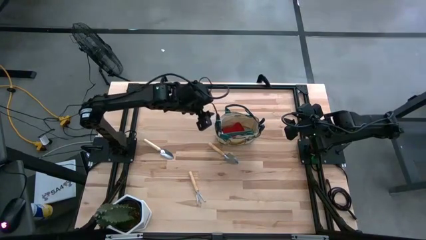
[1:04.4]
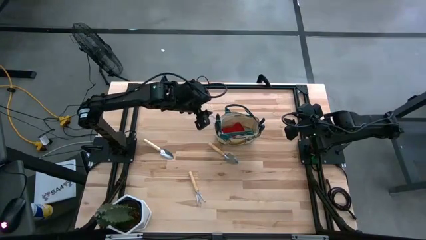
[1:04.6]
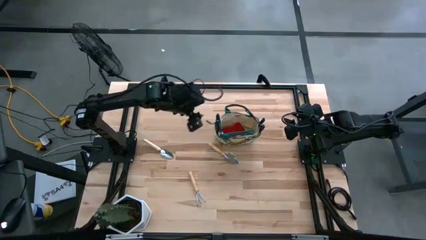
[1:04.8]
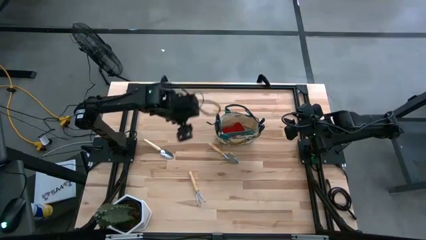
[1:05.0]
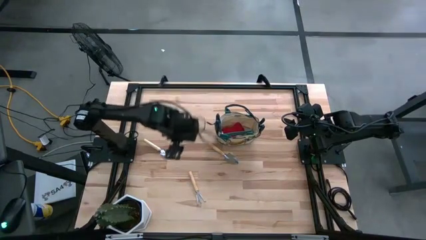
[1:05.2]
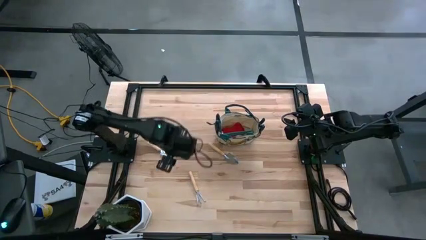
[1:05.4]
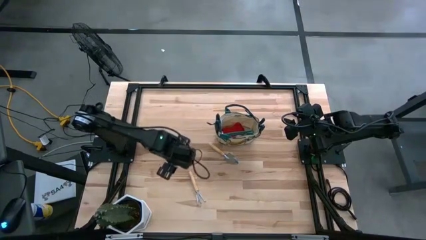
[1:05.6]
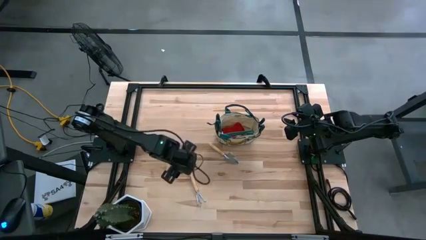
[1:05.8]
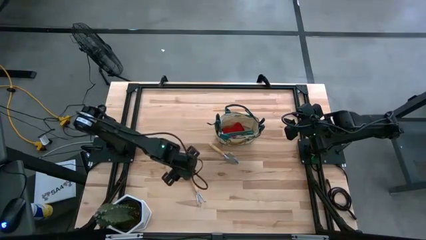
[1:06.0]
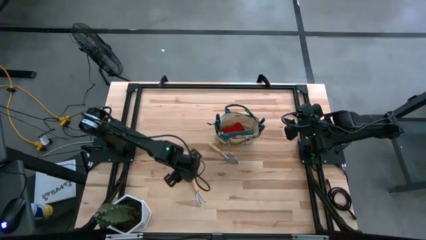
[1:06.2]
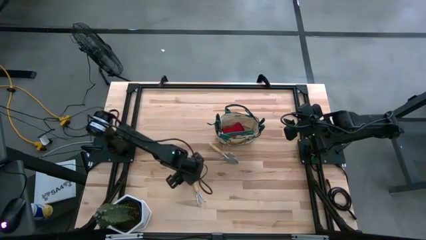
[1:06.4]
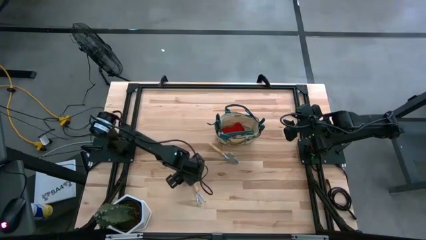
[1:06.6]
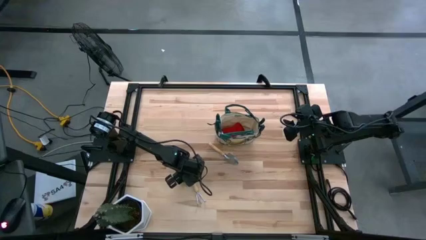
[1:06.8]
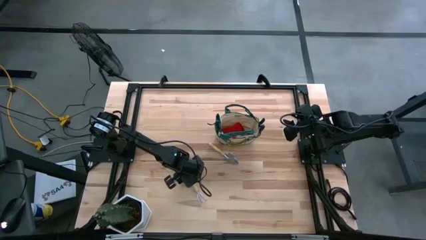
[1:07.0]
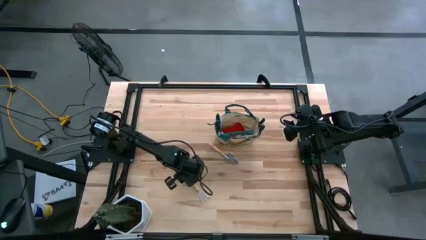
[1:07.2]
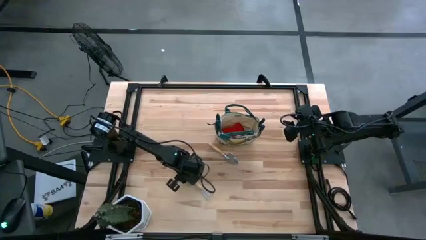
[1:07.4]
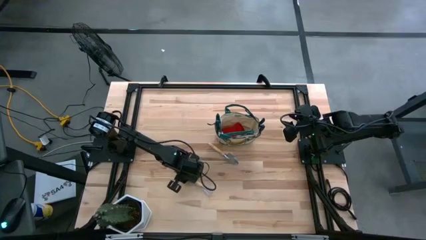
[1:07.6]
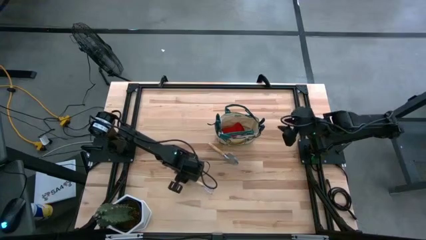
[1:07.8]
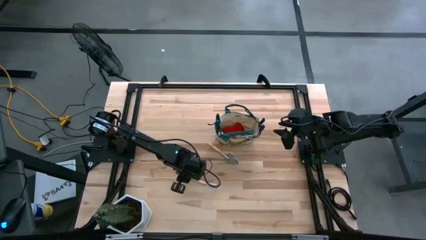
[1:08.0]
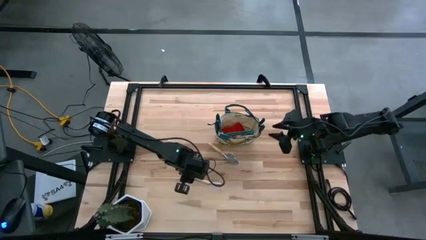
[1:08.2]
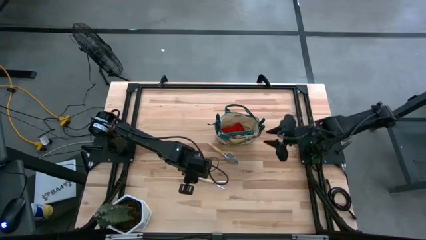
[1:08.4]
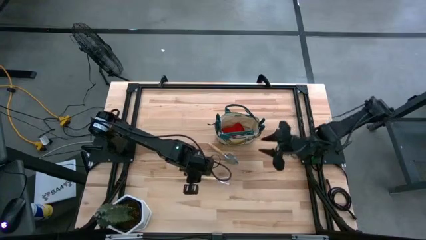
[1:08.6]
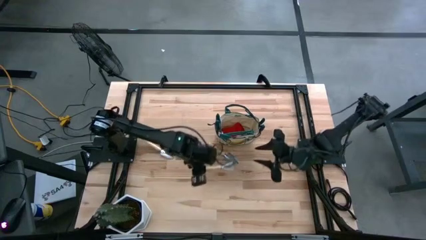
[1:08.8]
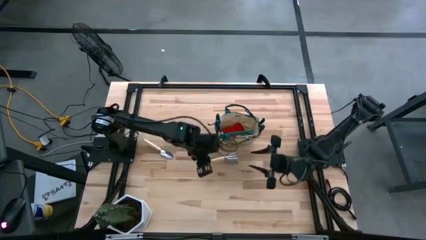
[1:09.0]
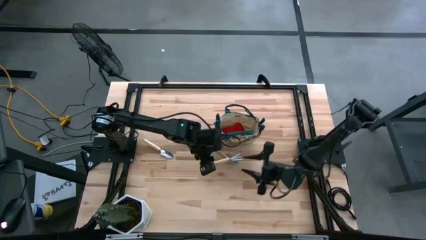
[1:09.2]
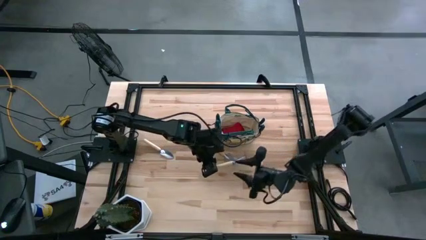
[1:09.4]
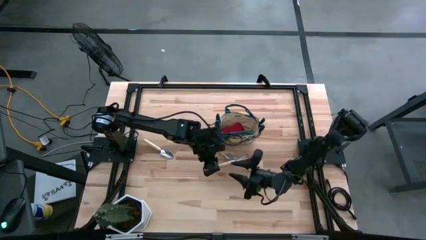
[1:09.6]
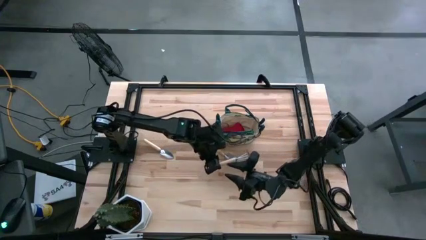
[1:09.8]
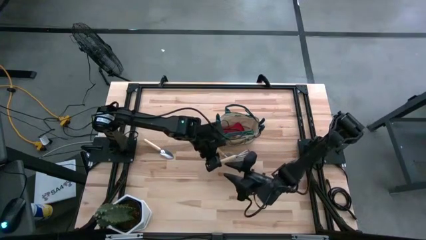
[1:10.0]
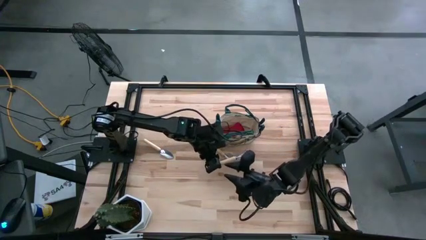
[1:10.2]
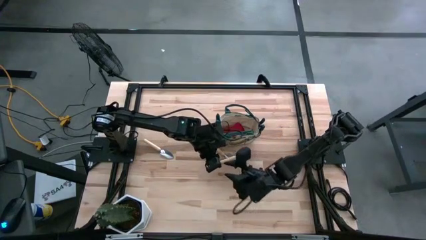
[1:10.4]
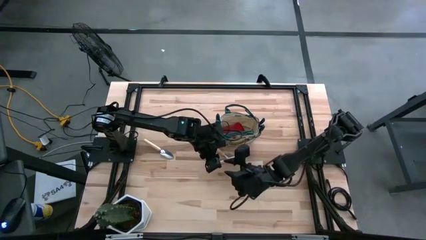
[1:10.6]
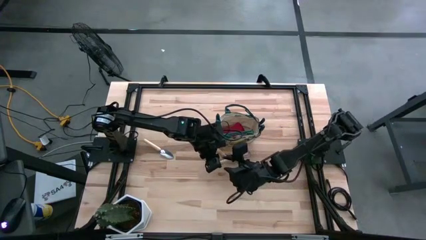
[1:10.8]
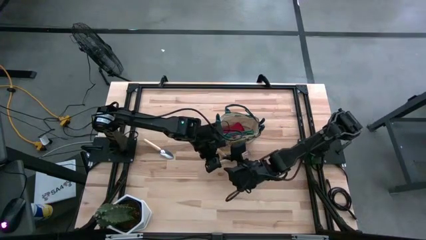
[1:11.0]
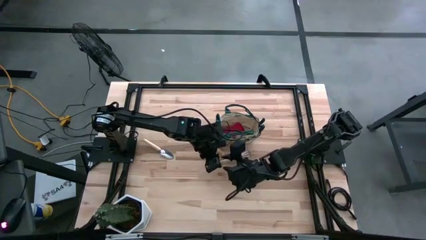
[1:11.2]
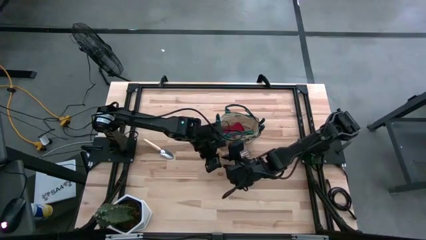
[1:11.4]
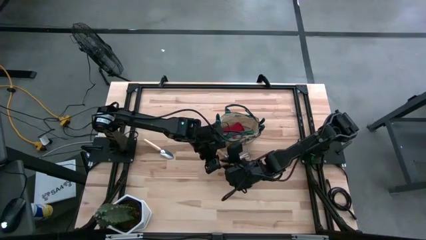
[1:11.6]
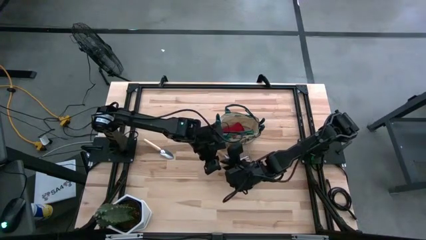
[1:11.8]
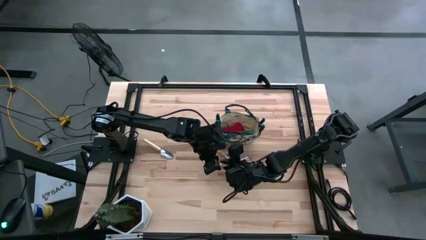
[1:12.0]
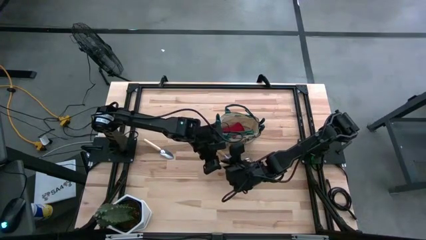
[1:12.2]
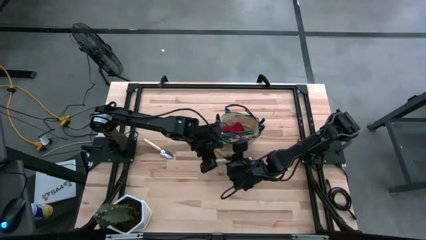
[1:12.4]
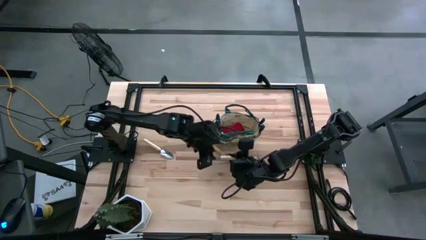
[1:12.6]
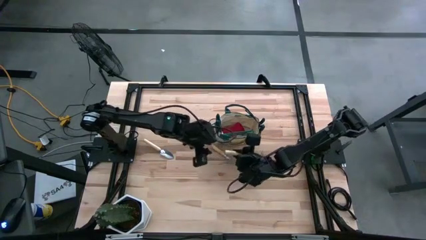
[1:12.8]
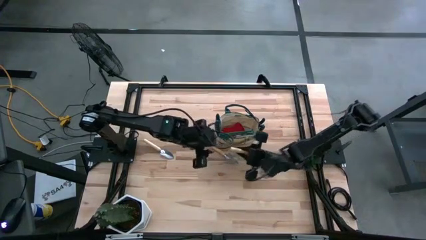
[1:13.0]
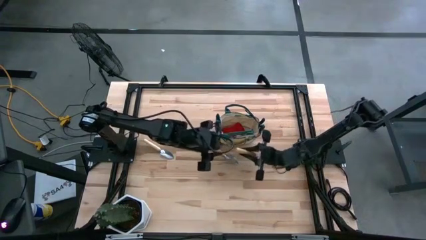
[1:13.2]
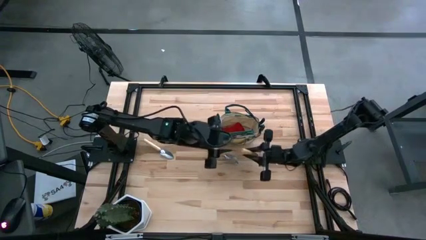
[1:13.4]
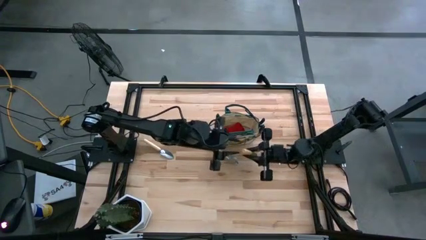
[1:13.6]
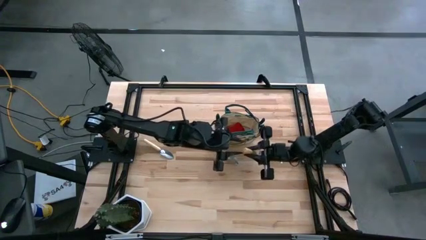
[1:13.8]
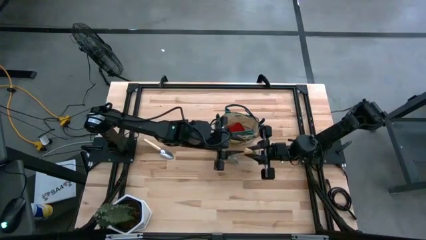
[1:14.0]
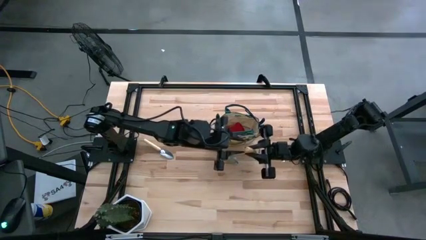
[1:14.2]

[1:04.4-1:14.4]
Task: Pick & Place Garden tools in Gardening bag
Put the brown hand rake into the gardening bag

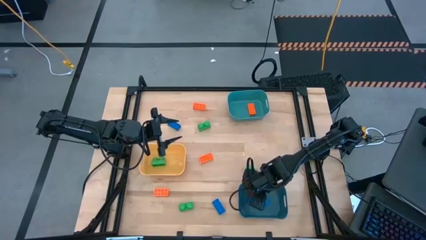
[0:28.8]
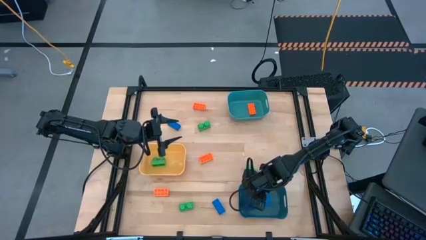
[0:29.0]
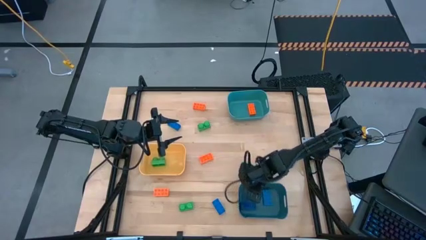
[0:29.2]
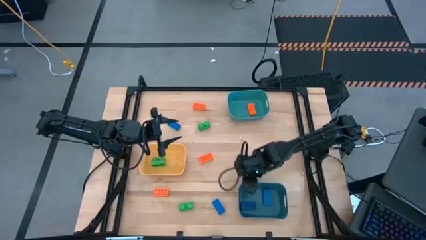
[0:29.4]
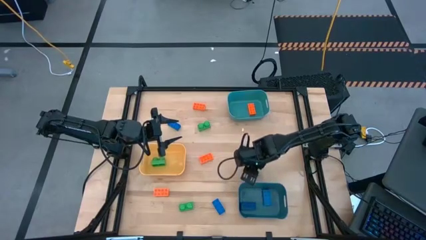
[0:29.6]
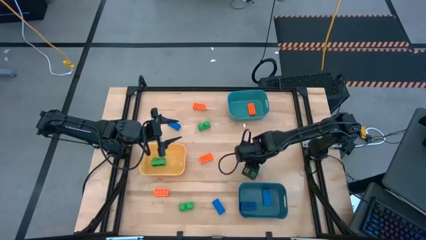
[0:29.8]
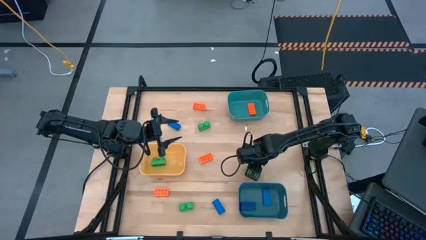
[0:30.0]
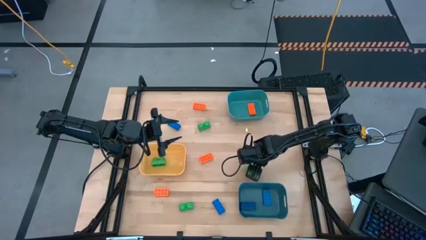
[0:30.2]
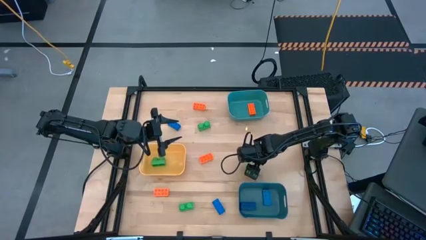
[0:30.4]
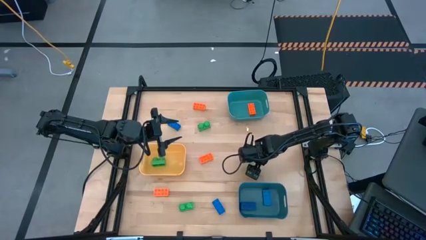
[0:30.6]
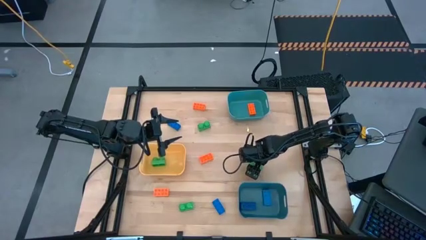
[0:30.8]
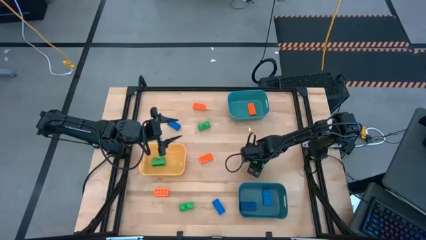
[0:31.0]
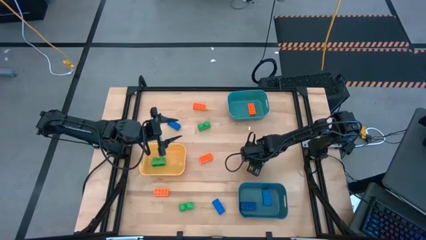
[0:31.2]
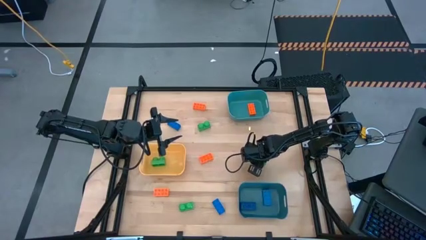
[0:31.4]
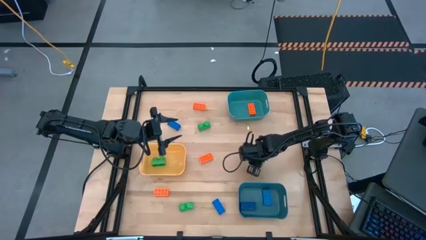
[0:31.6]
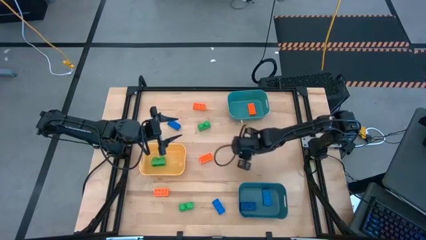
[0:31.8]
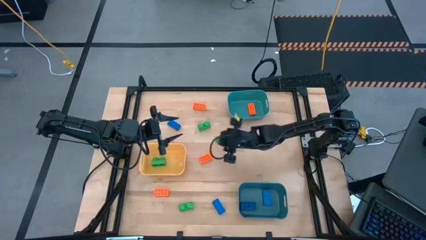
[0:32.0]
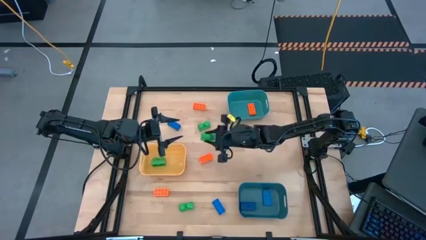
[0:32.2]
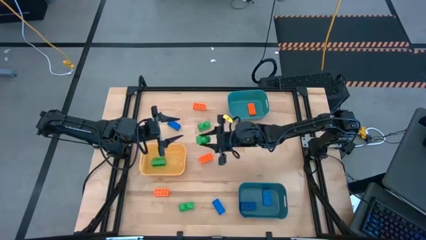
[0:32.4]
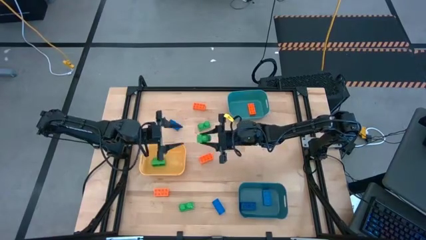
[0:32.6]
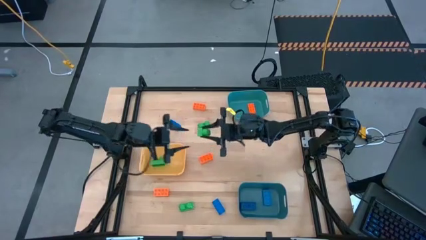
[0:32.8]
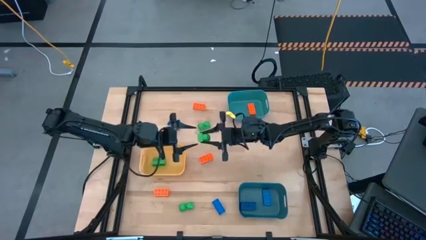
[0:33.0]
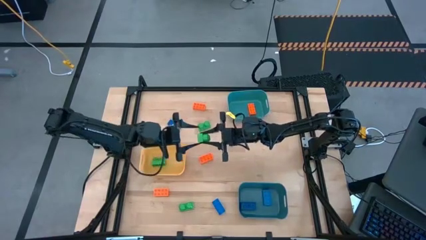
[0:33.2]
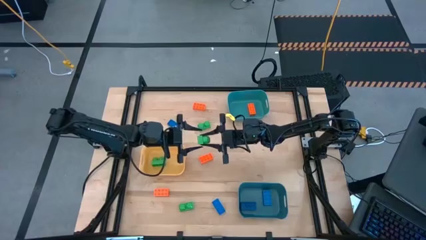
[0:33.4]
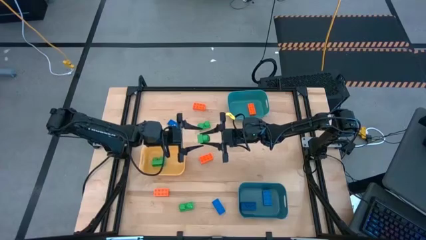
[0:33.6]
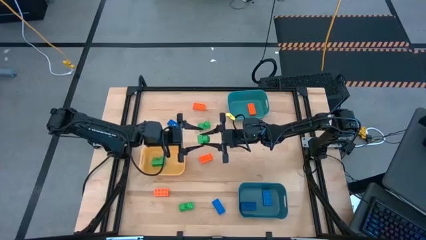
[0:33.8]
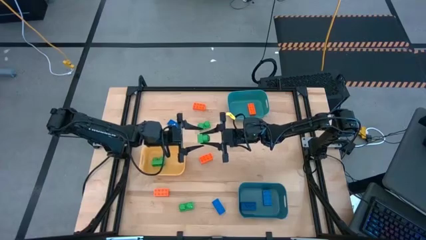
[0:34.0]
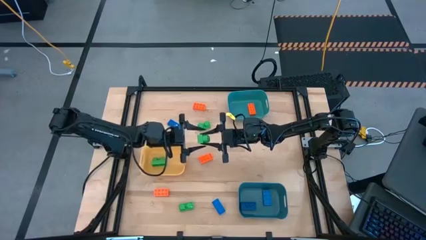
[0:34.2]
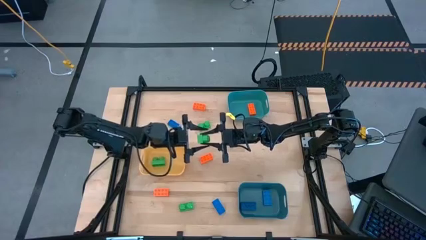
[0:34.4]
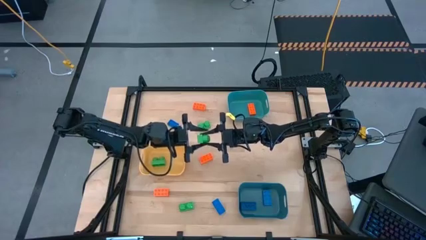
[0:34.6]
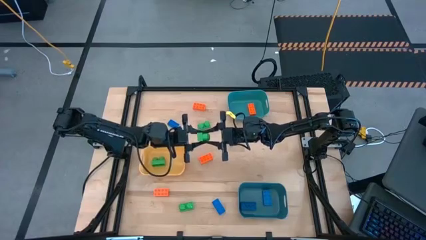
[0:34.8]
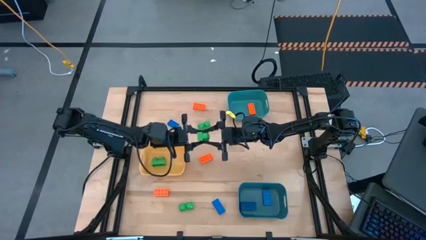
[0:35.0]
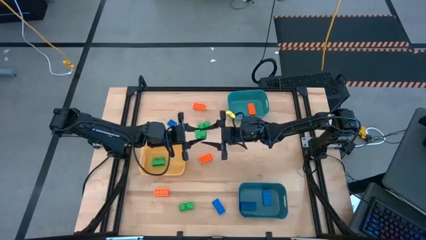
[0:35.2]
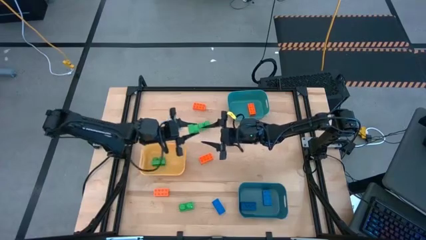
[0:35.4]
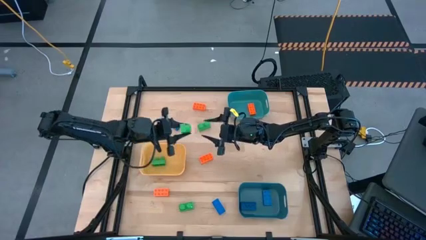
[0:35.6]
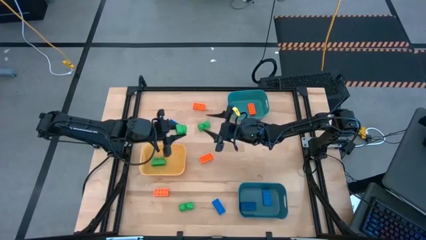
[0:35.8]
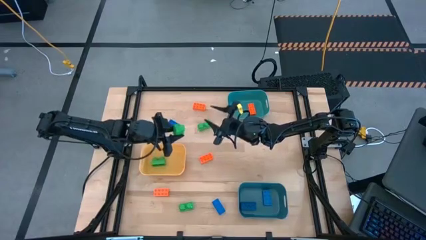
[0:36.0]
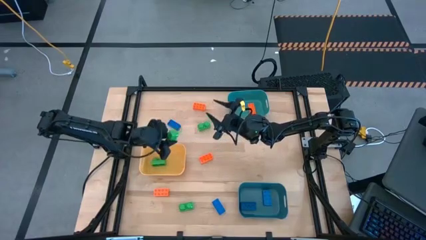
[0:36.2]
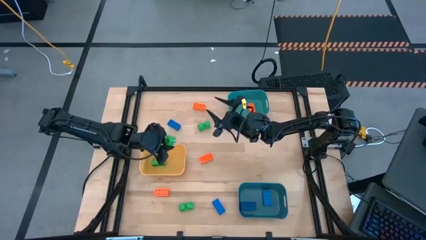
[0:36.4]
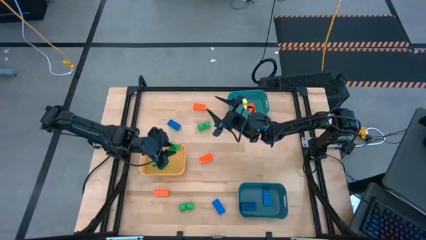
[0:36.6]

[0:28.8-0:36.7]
Task: Sort & place blocks by color
Put the green game piece into the yellow bin
